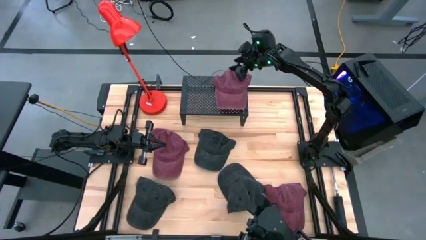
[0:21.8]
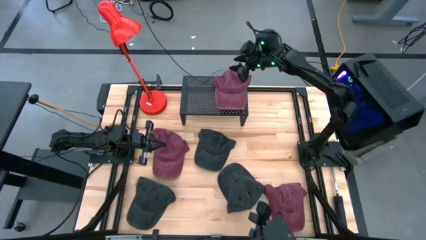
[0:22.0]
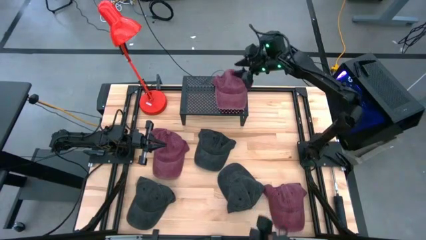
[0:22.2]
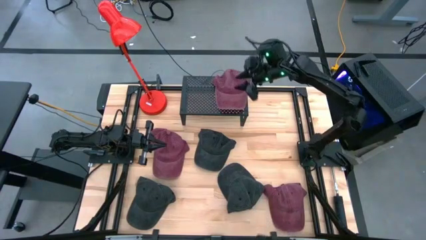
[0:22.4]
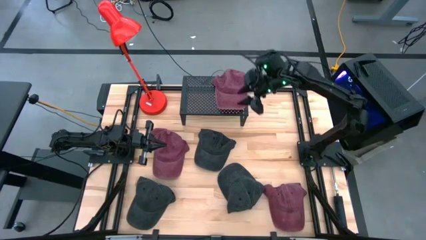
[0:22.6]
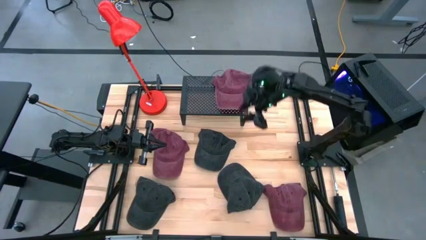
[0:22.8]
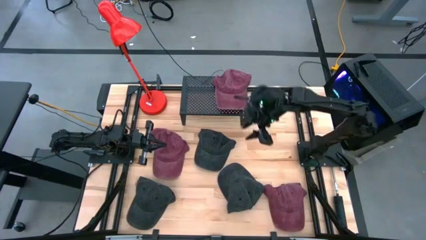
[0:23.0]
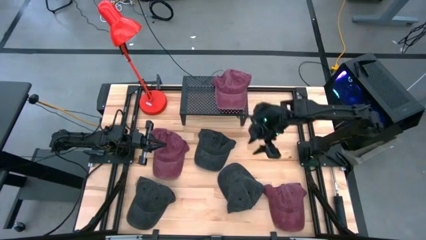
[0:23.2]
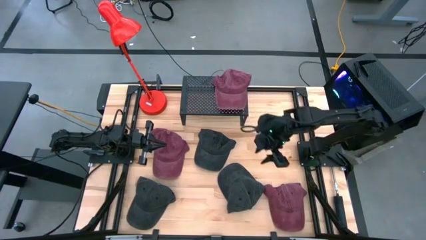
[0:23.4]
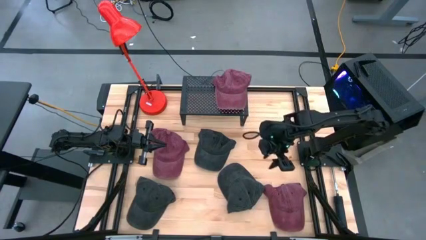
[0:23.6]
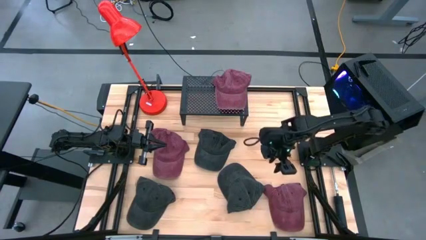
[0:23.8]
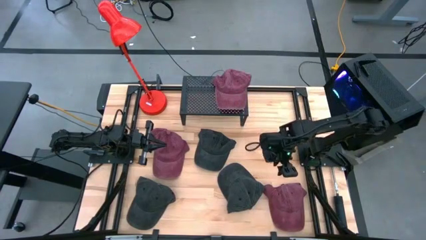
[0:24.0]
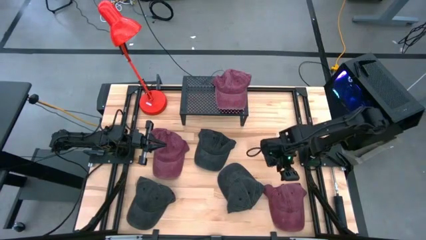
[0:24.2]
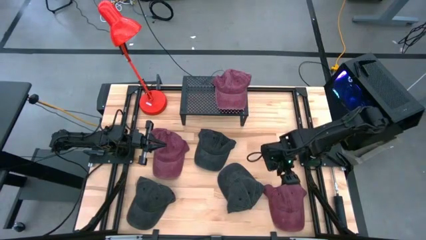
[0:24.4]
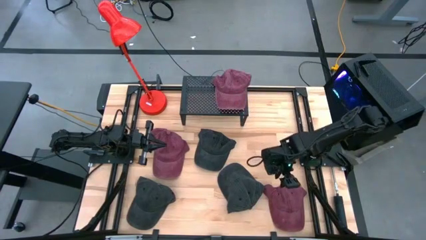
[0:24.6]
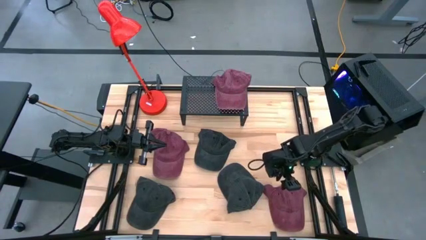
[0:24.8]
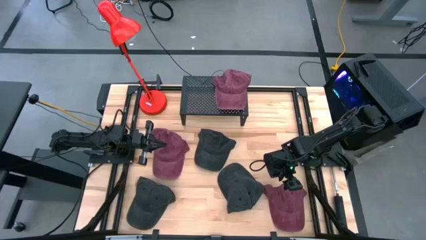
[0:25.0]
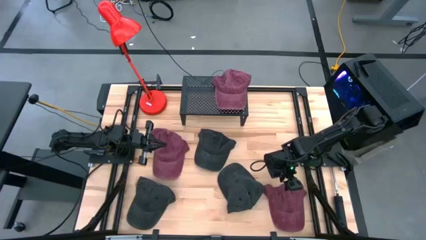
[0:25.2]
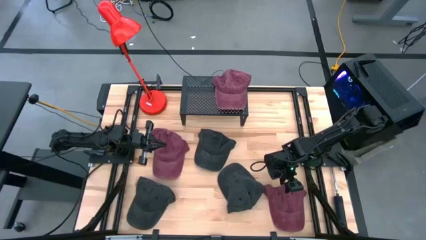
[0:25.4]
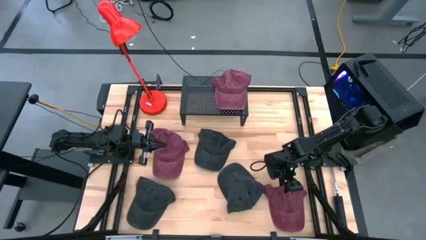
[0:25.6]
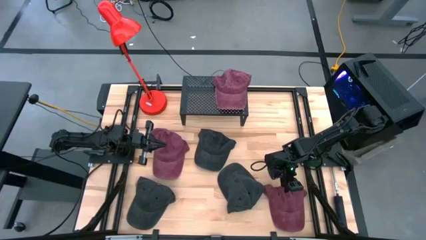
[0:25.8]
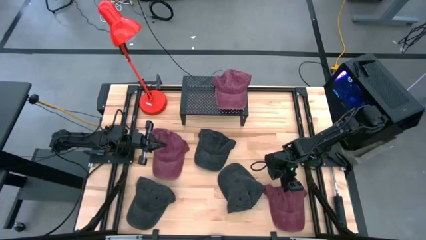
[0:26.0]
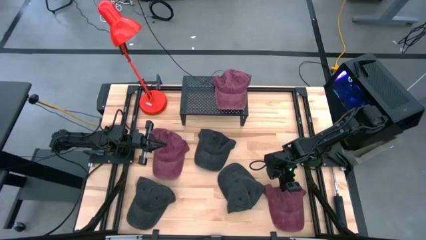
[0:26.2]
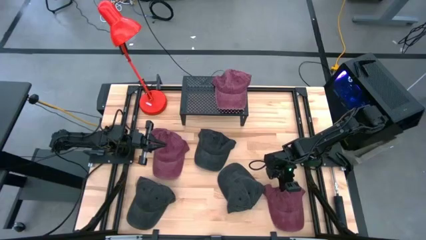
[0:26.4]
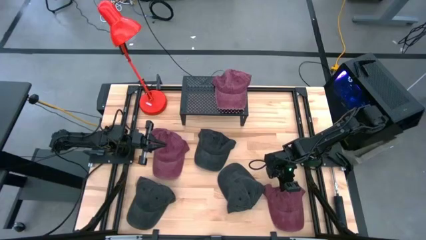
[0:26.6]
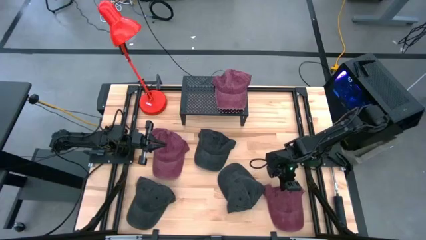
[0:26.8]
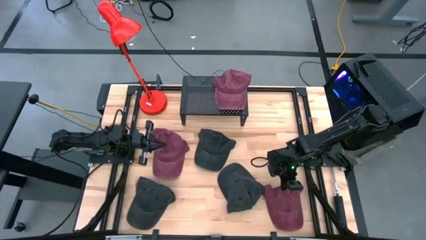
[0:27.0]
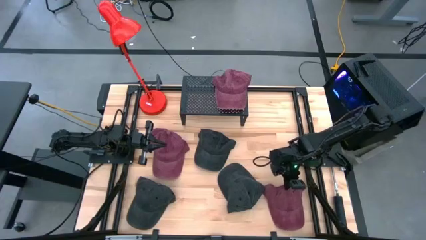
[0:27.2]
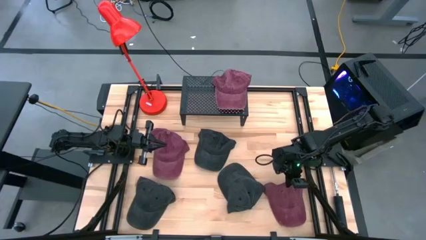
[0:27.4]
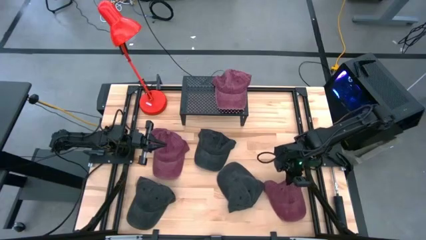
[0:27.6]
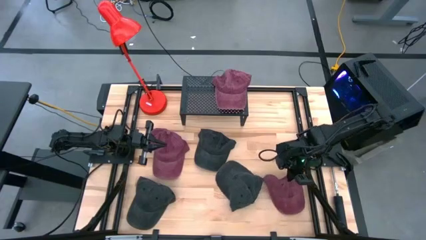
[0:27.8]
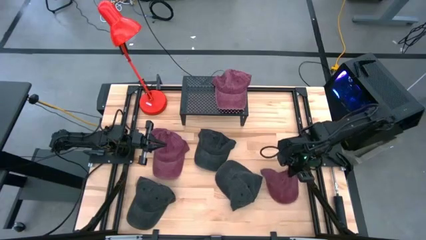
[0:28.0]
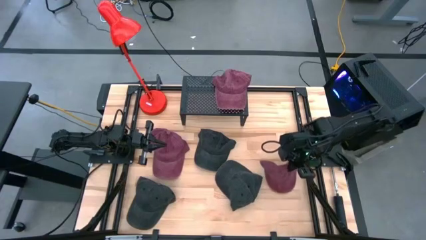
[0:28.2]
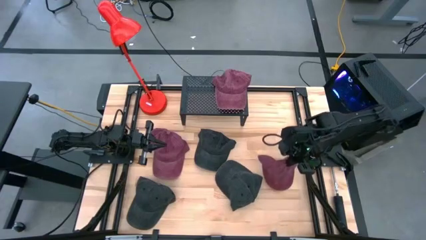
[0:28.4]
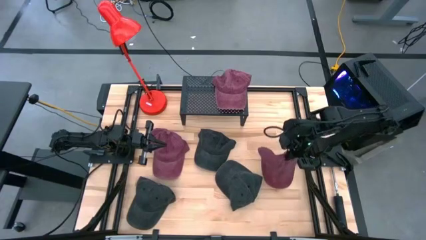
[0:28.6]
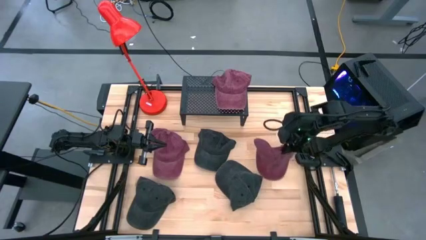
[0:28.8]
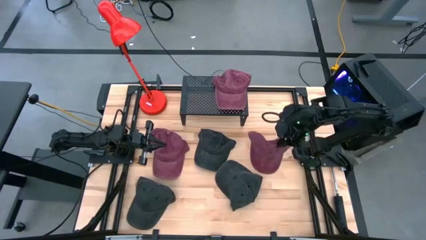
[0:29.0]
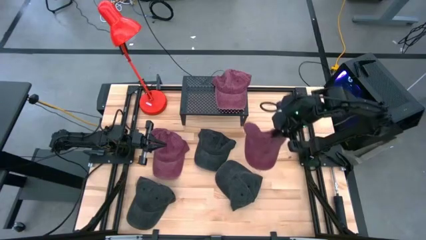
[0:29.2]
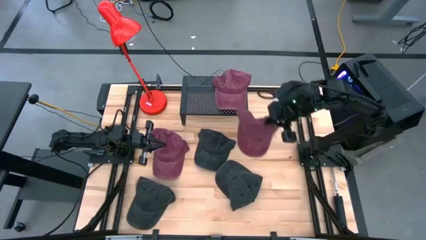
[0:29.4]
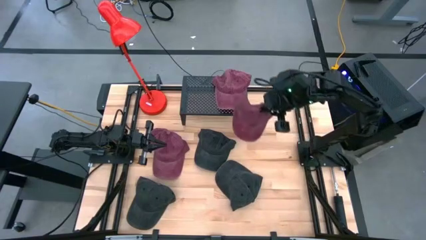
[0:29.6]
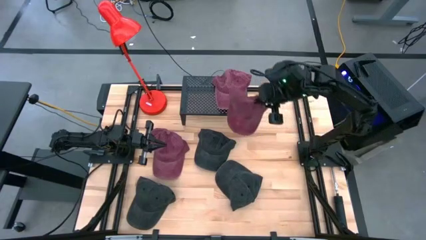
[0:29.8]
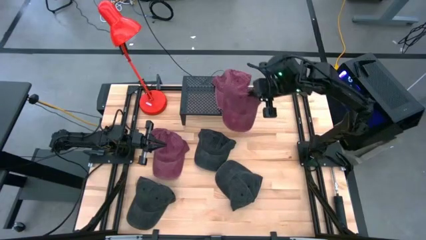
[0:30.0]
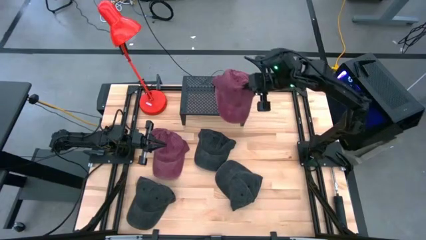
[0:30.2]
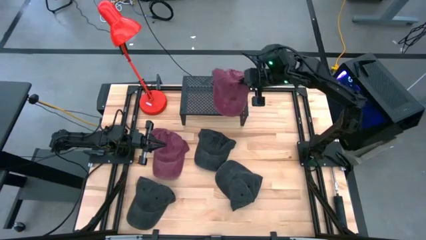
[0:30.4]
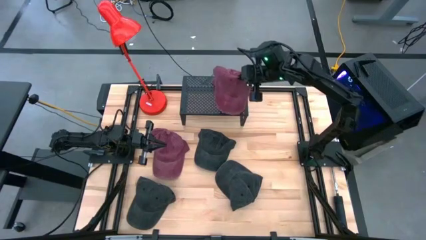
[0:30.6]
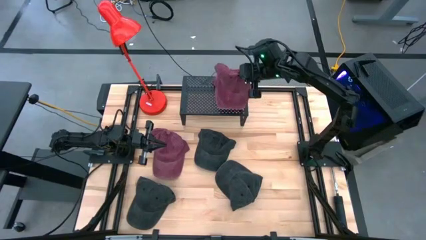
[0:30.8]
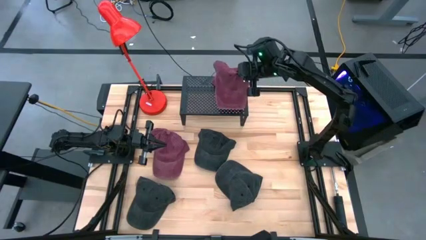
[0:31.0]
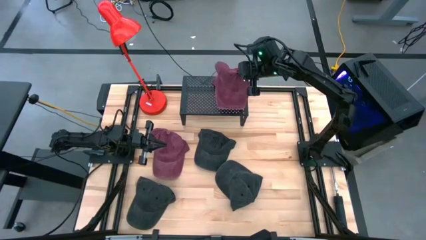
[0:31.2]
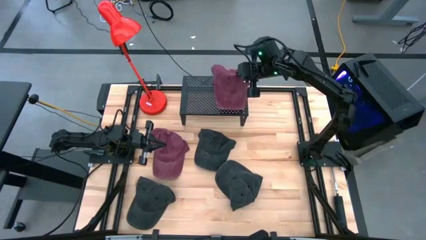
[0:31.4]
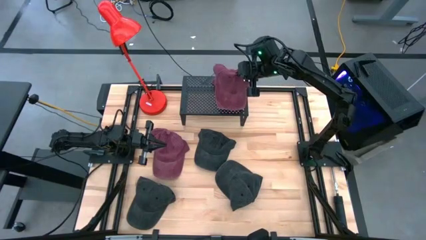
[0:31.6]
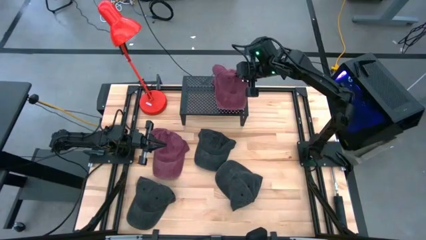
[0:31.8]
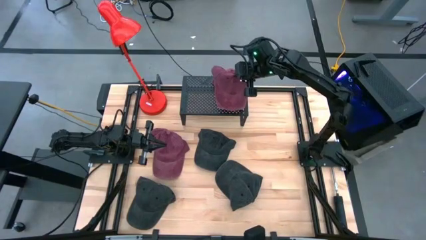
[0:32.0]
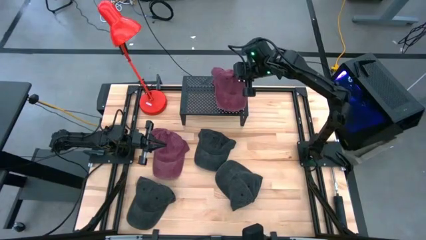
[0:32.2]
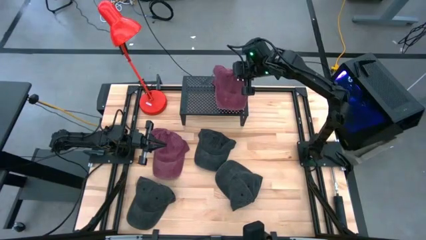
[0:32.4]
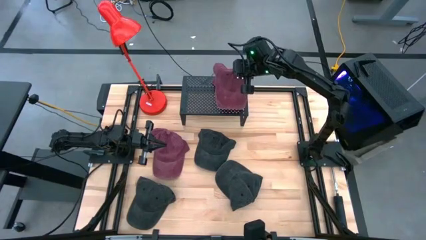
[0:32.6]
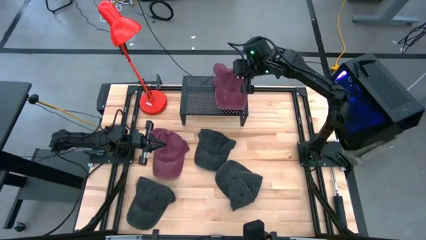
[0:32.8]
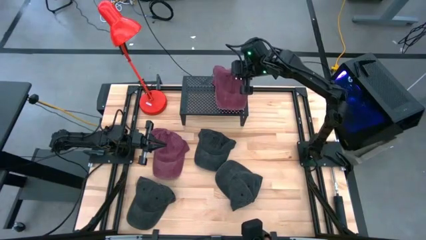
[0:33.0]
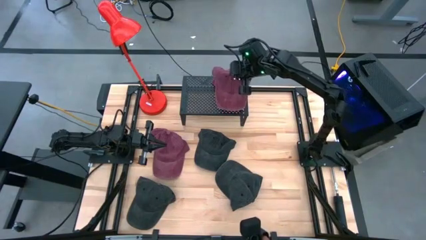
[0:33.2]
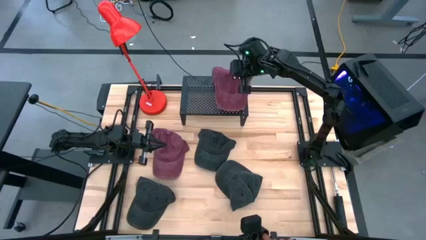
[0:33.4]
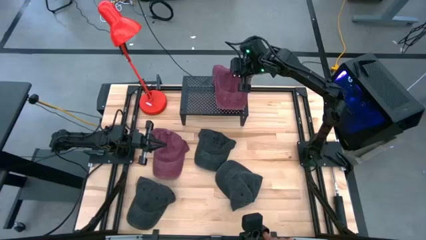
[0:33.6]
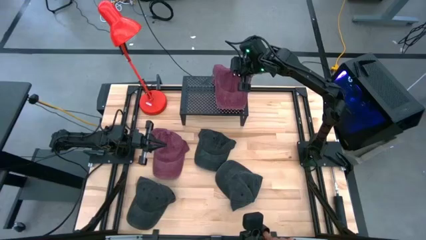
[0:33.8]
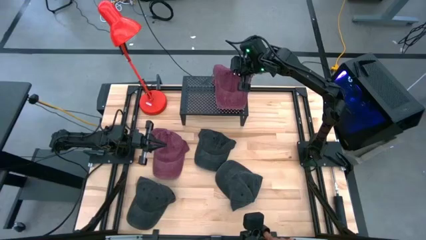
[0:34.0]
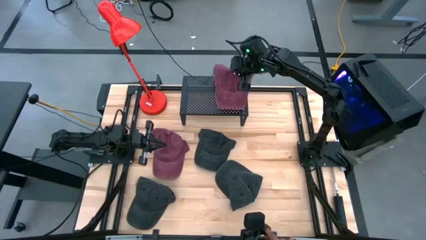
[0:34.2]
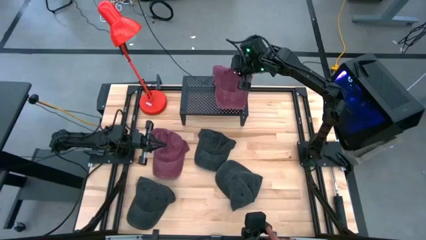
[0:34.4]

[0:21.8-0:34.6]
Task: Pick & Place hat
Stack the bottom red cap on top of the red cap on the shelf
